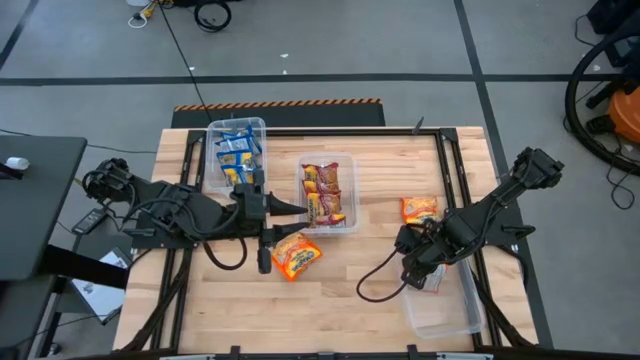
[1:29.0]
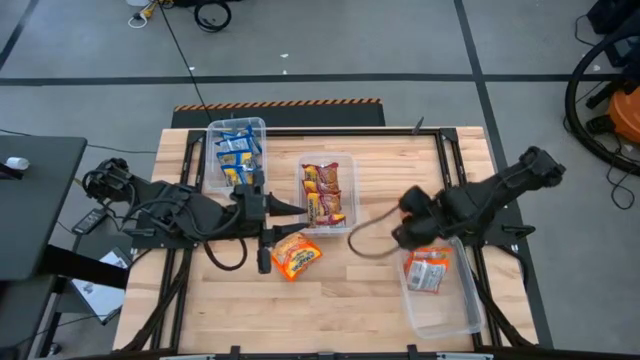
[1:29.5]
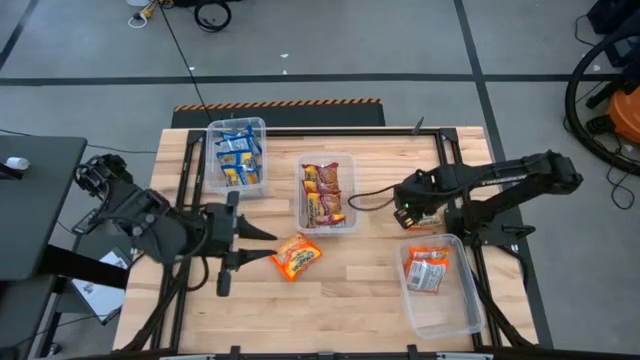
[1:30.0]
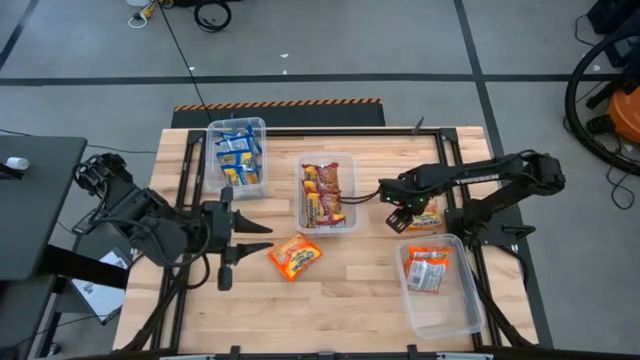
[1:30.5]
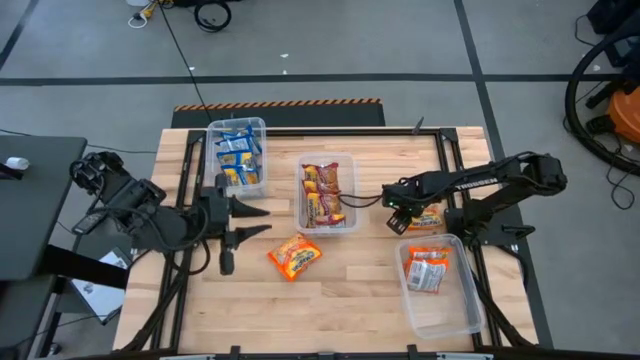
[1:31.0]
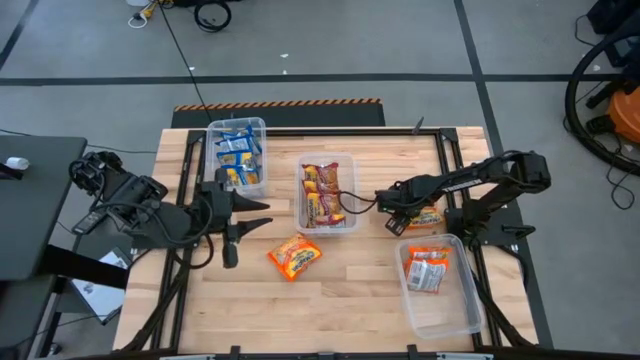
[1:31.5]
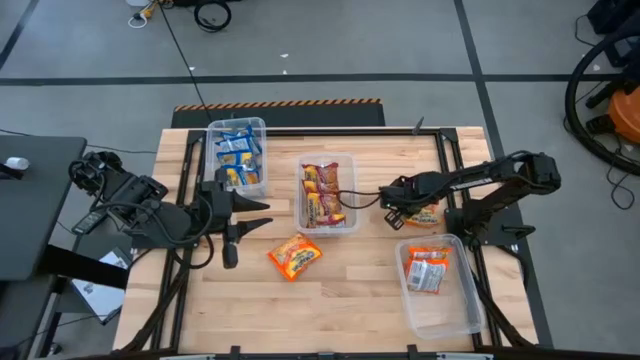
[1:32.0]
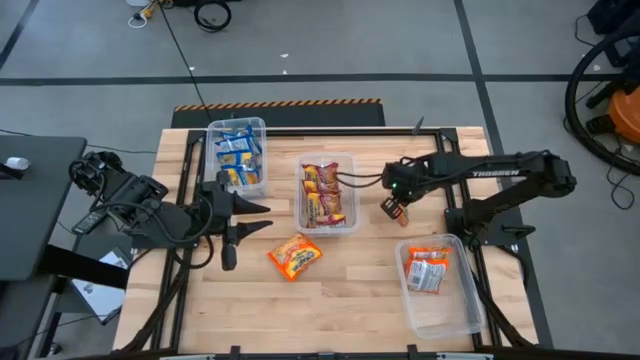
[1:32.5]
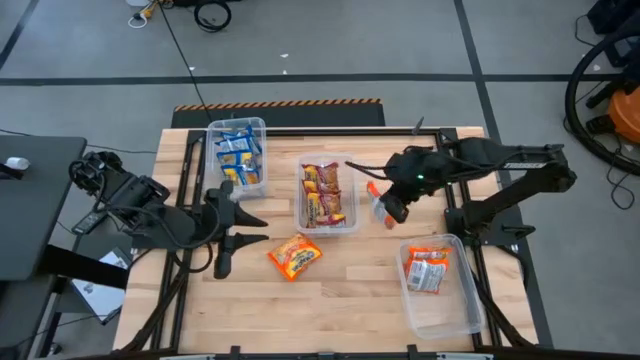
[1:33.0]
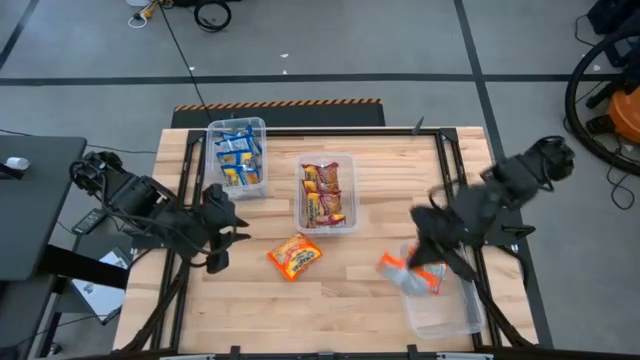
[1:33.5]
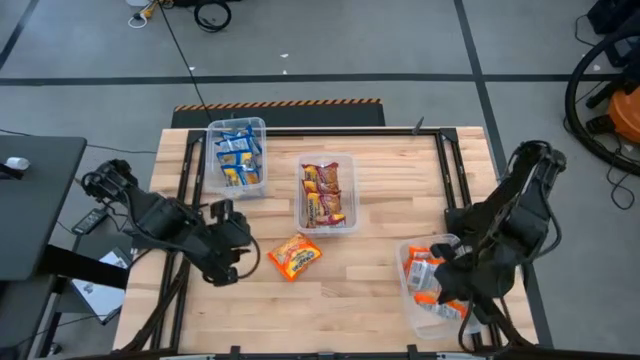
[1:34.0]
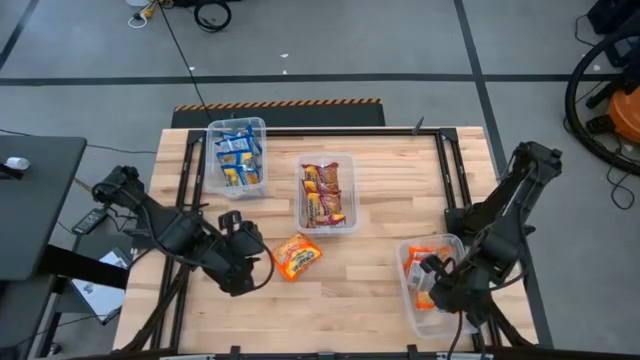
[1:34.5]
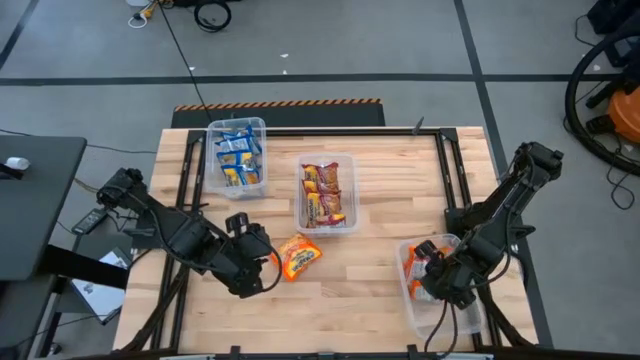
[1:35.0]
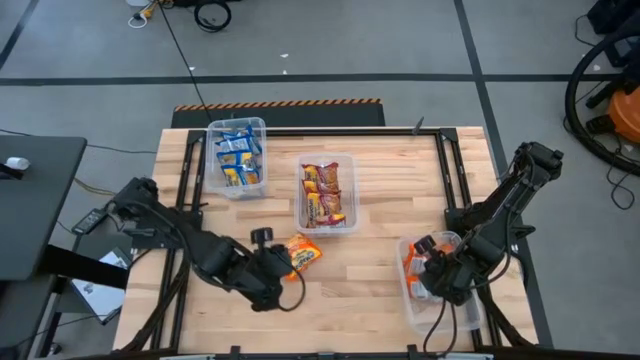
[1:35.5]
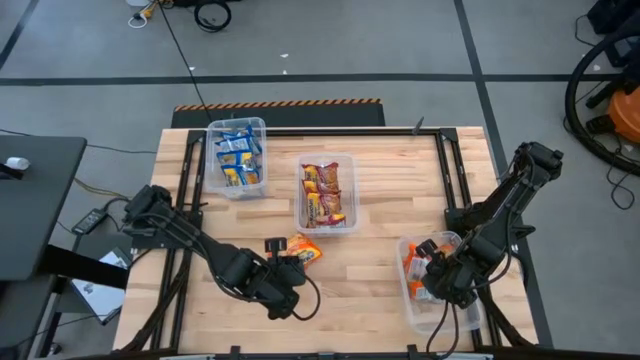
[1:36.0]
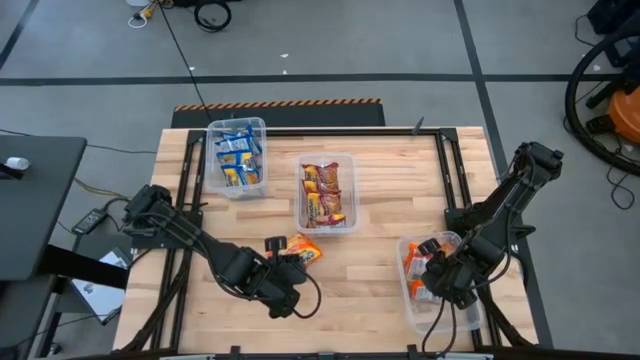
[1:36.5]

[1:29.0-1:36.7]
Task: Sort Maruchan noodles
Put the orange noodle pack into the bottom transparent bin

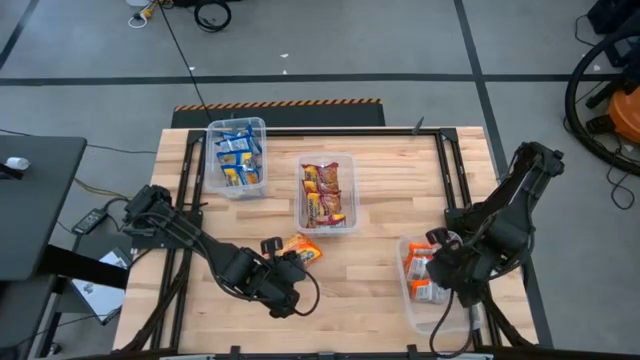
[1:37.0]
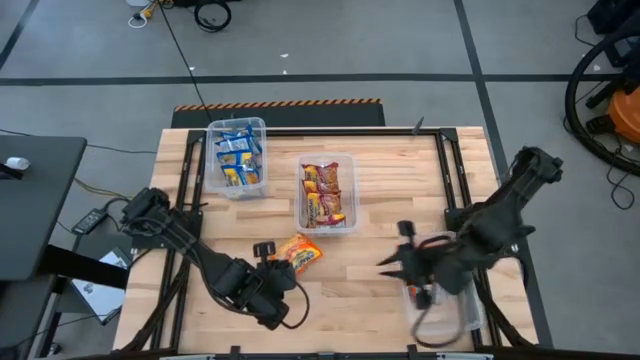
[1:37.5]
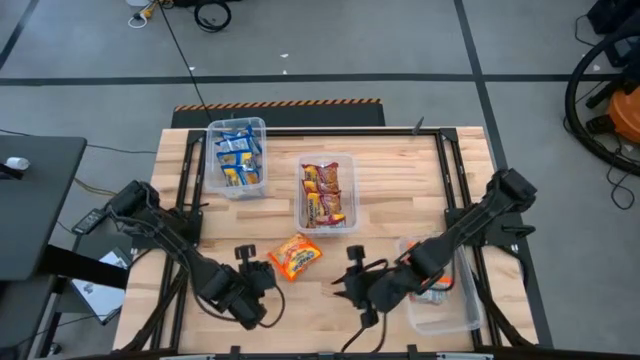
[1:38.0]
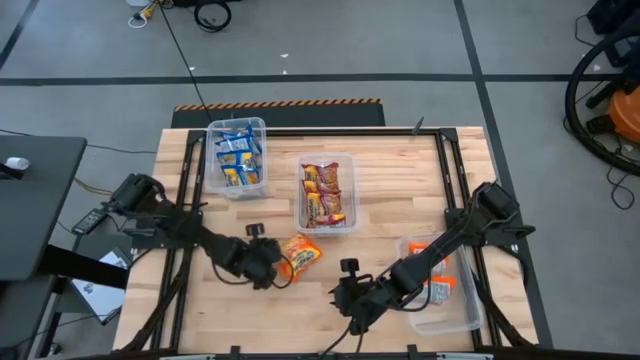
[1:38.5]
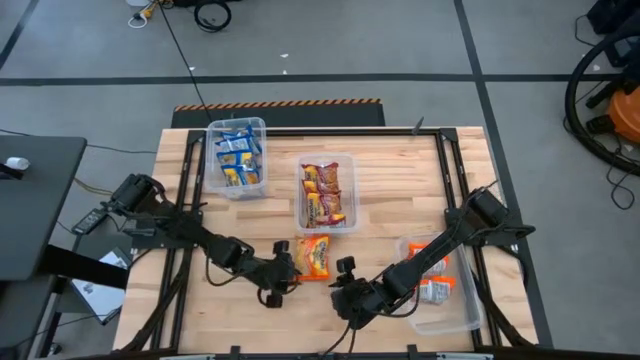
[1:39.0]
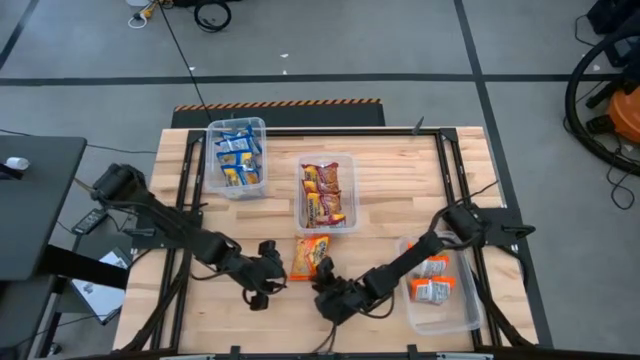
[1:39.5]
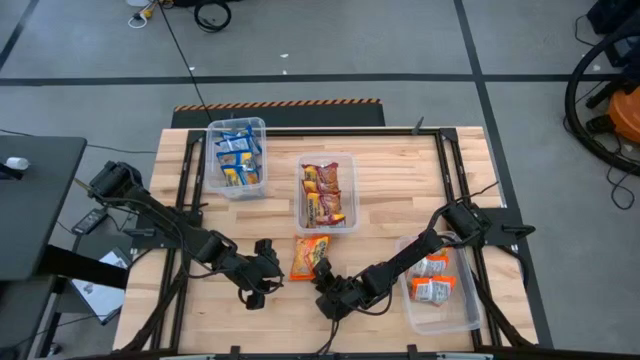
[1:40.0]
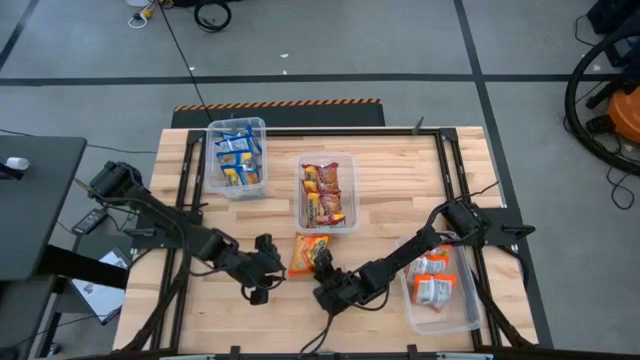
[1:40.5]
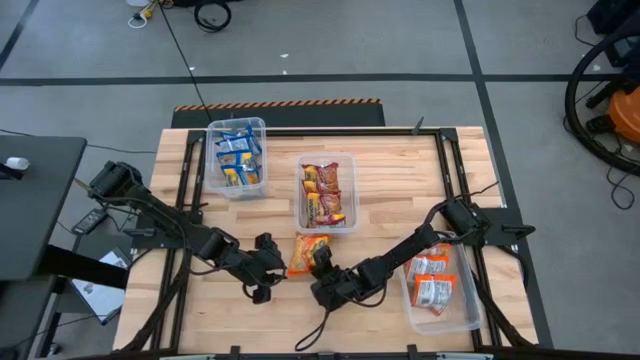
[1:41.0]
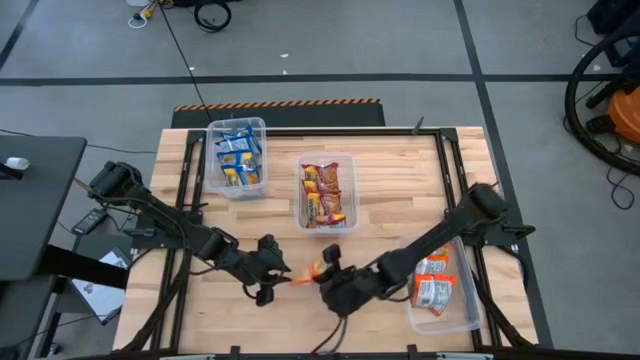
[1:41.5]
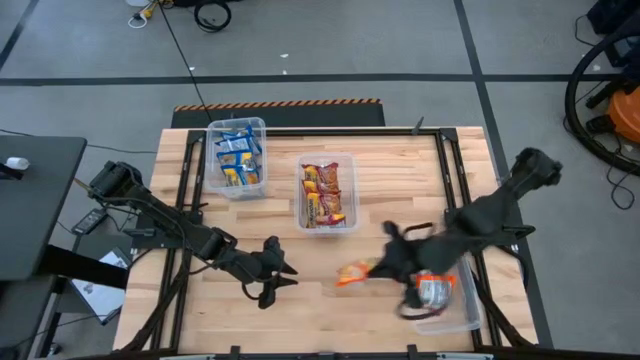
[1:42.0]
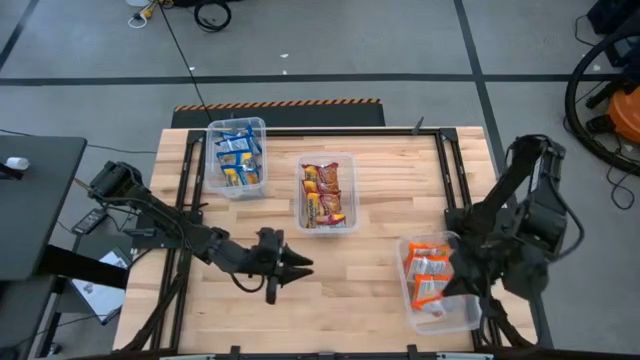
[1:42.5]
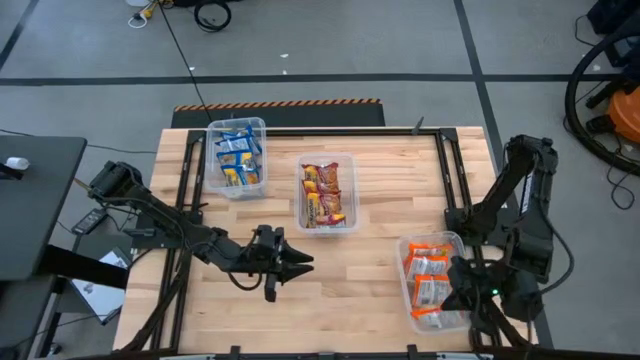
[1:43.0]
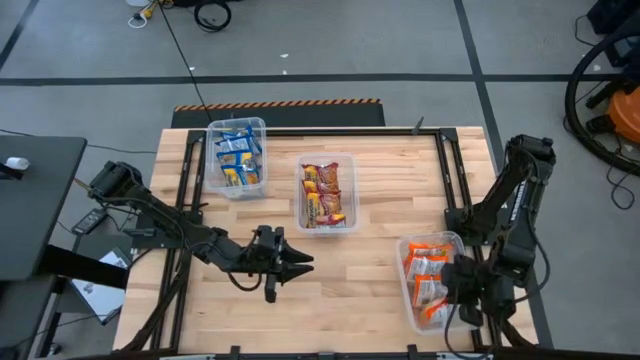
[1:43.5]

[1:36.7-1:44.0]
Put the orange noodle pack into the bottom transparent bin

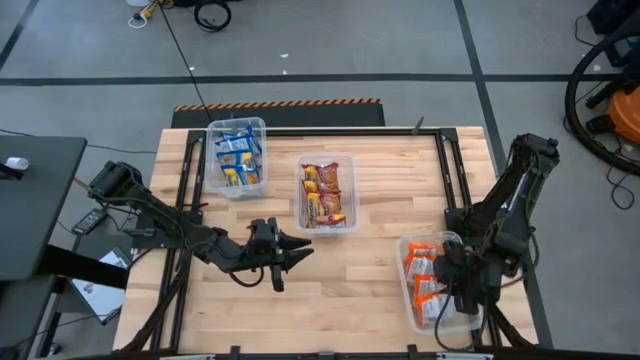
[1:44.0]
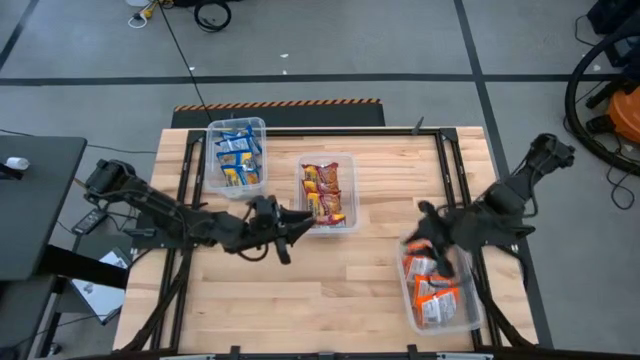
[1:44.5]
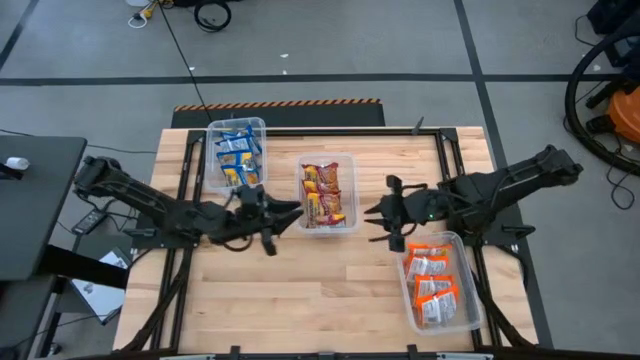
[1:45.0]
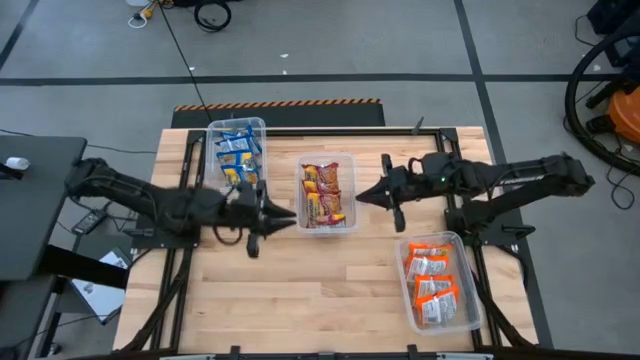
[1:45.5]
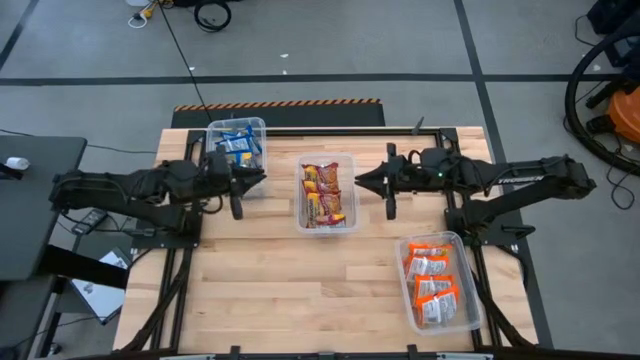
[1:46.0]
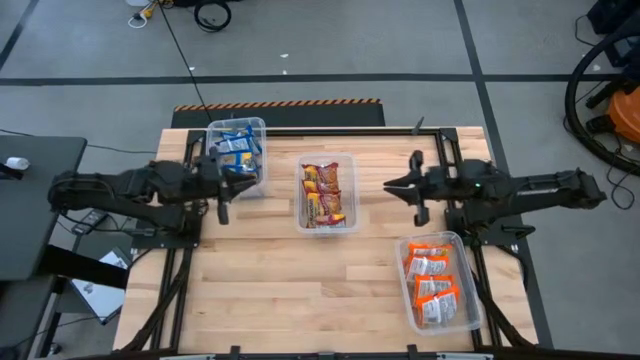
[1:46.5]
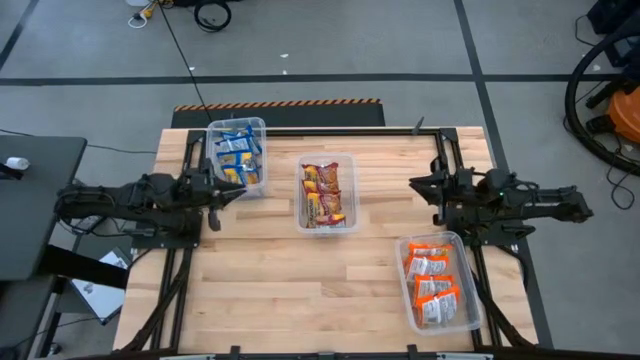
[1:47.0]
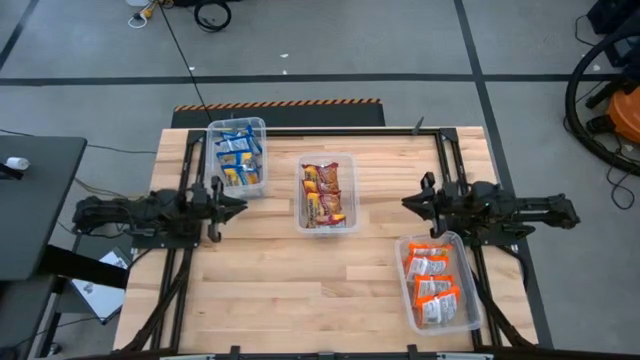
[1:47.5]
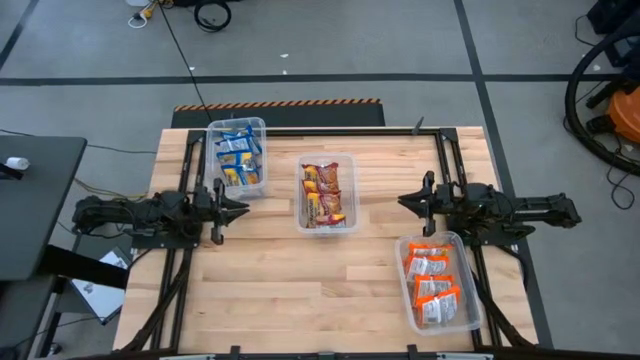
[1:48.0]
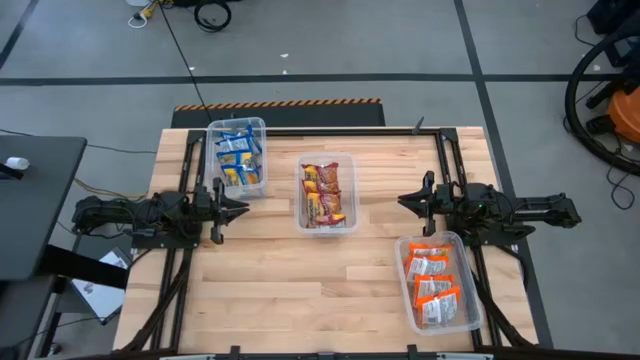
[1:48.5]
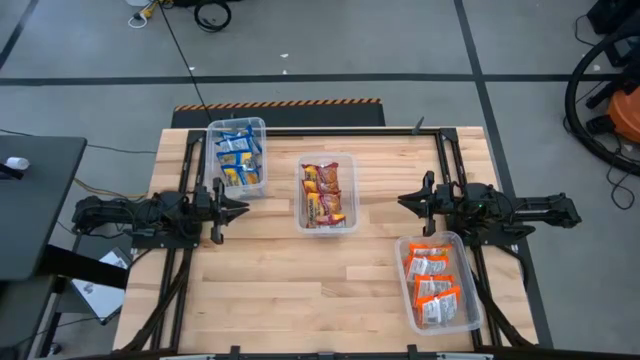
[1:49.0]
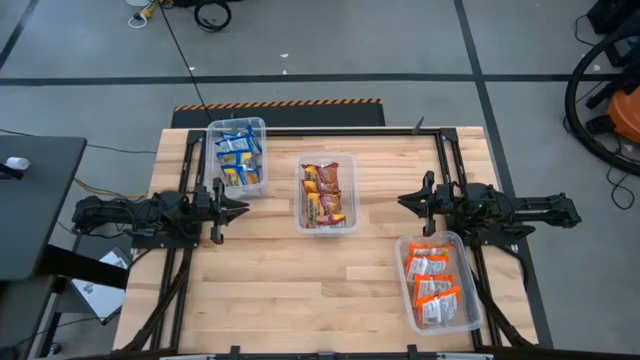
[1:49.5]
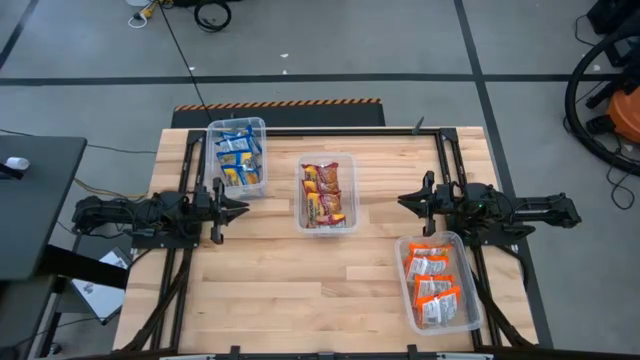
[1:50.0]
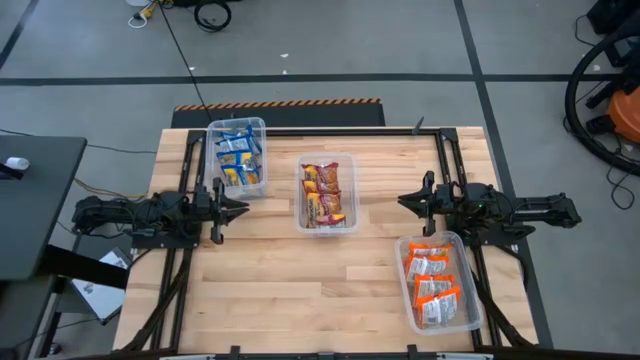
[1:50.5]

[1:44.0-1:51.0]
Return to Home Position
